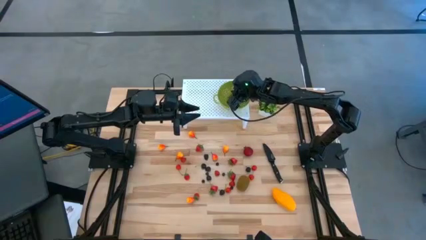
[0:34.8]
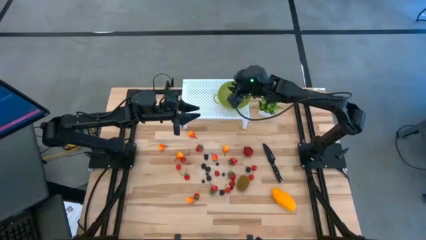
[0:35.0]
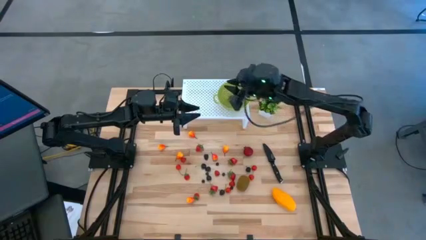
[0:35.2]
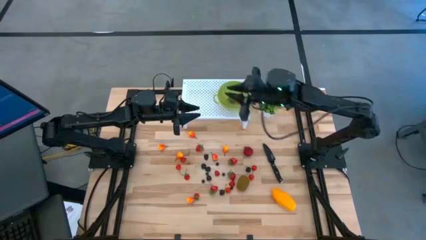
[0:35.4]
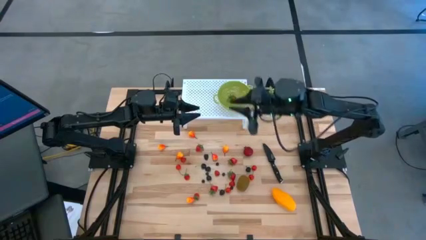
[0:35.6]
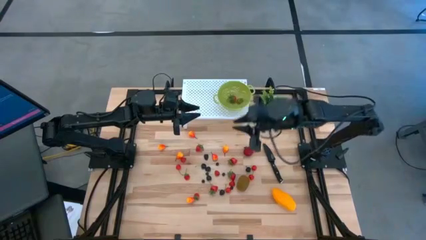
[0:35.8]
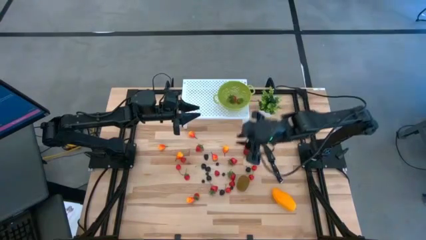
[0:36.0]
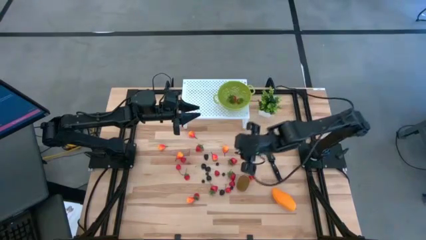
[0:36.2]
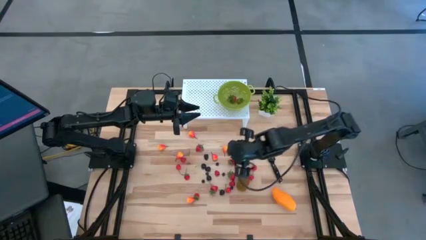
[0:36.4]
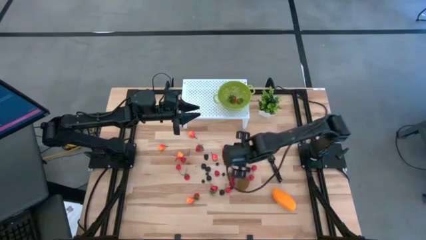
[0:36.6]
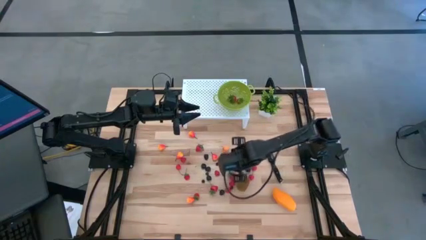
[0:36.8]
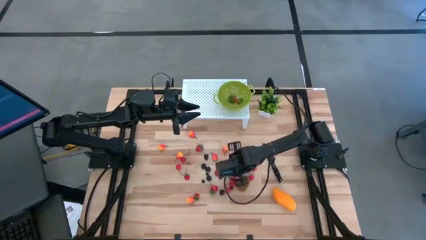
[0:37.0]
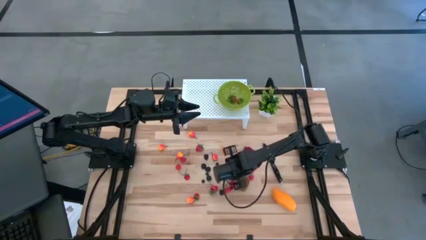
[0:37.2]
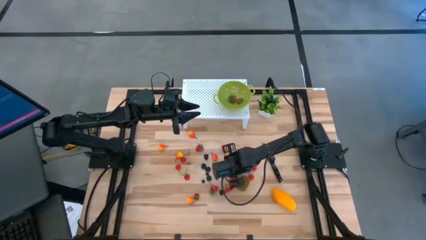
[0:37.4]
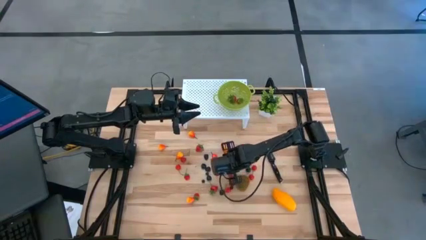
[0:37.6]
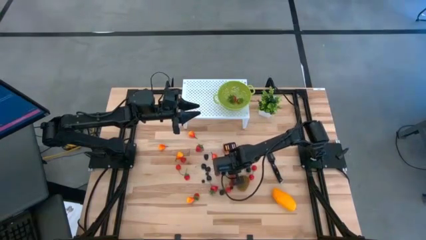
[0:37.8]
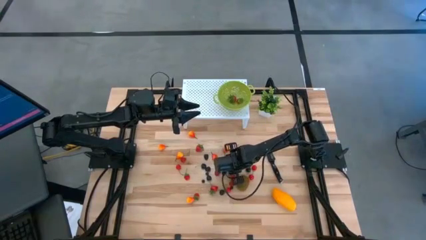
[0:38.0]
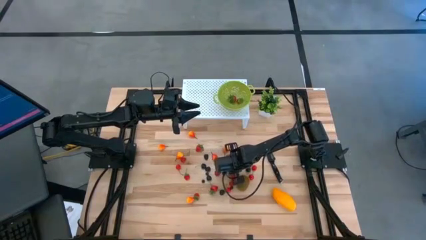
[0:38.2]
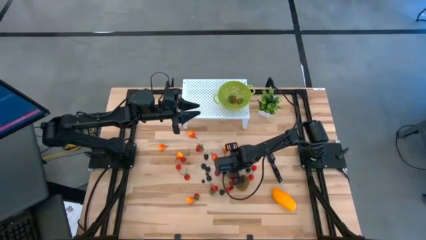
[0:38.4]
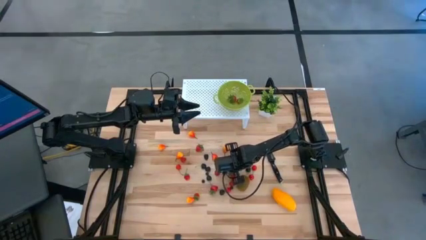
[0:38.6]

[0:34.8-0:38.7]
Task: Pick & Place Fruit
Put the red strawberry into the green strainer bowl

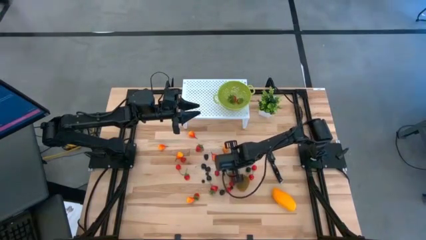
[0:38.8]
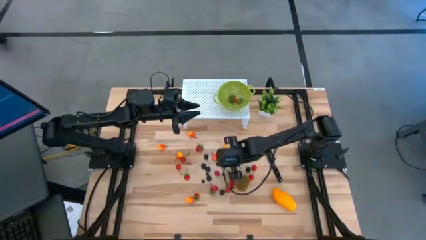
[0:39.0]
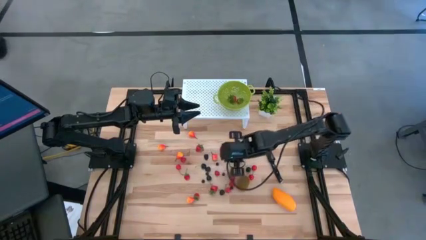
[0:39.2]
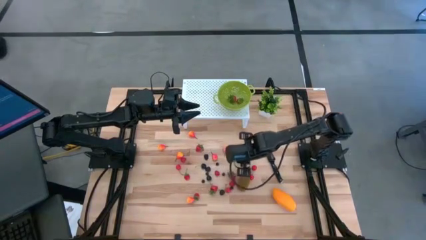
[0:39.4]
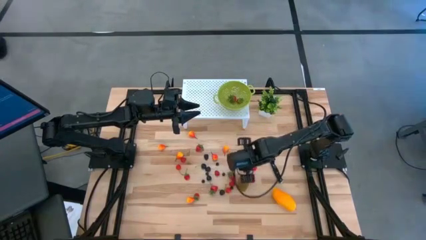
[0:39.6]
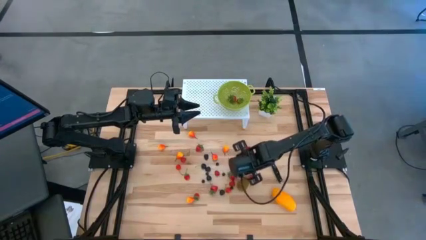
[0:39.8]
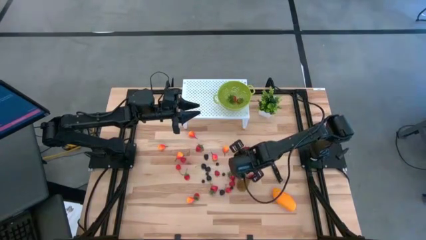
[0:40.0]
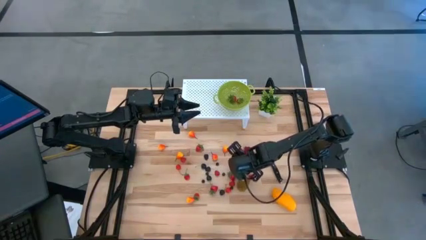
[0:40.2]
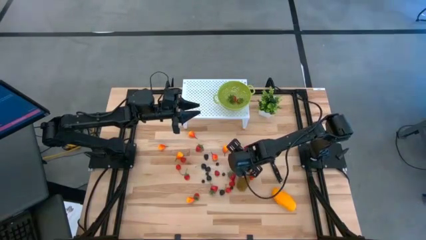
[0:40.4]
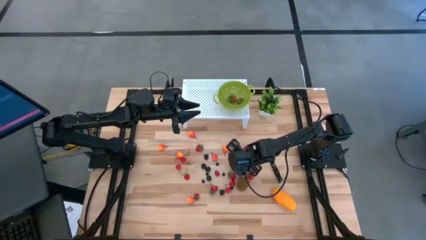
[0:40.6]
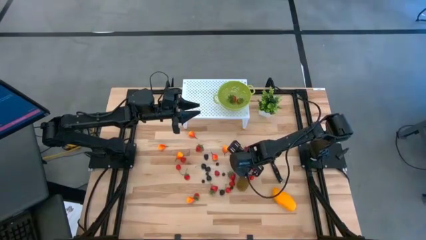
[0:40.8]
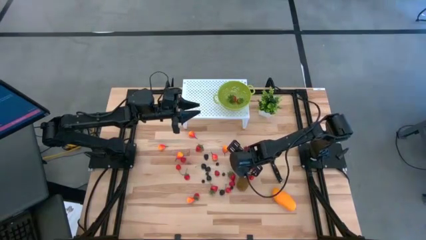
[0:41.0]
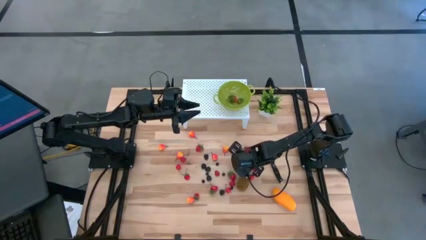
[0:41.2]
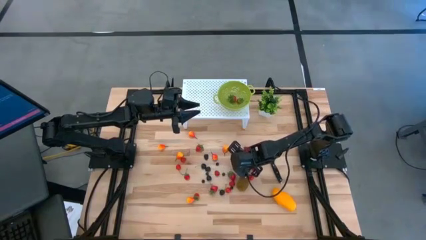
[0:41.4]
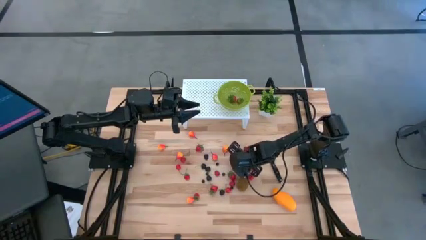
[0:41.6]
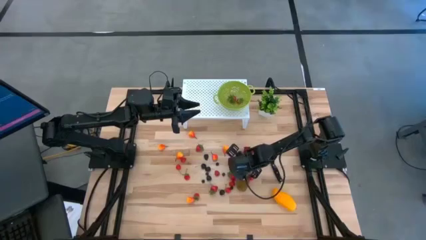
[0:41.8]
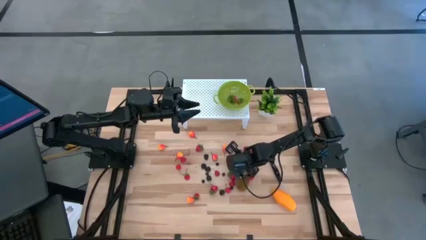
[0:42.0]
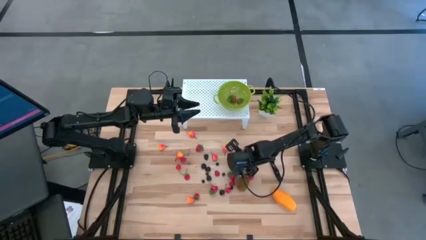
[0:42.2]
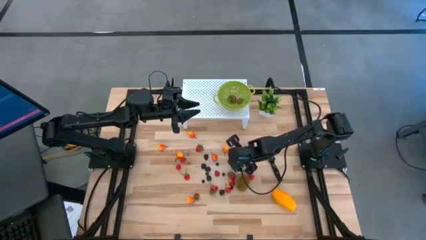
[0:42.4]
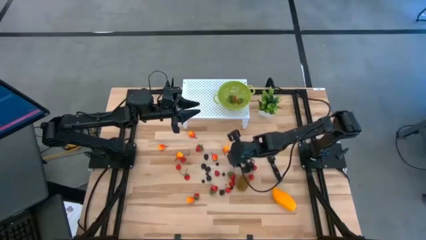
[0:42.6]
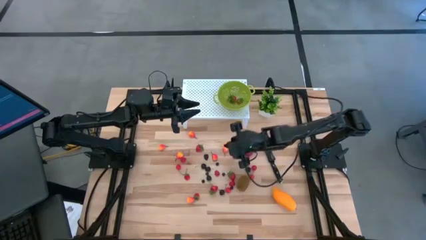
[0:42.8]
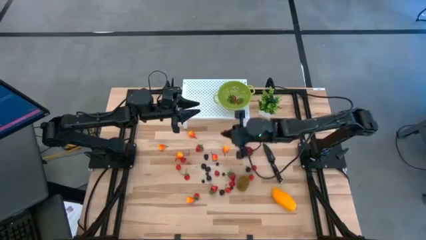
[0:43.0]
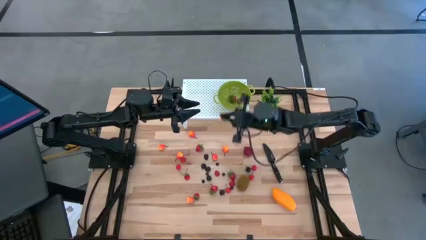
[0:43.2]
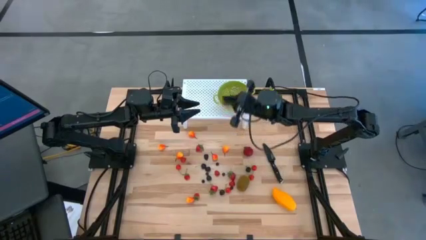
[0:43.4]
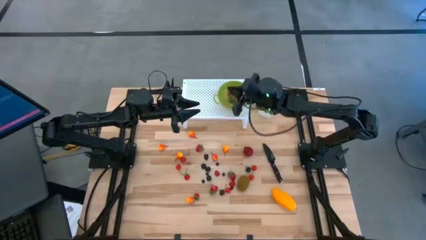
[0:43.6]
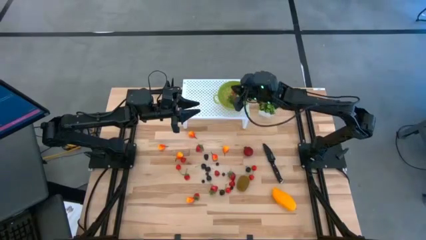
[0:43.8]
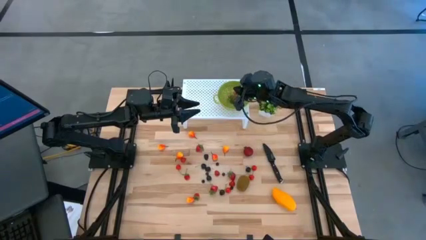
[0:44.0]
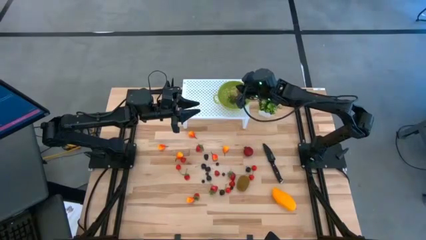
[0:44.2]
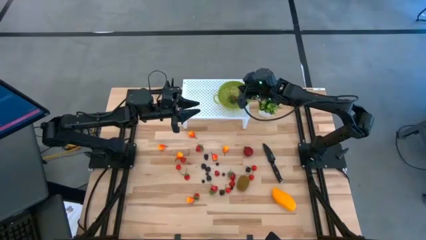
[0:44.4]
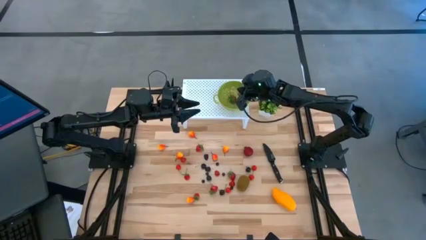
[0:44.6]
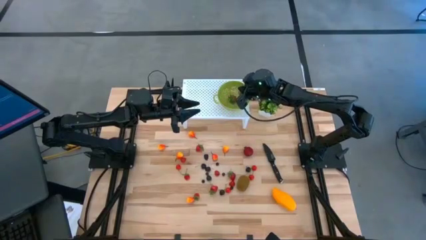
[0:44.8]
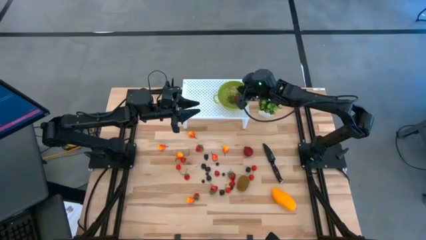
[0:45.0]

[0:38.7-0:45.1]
Put the red strawberry into the green strainer bowl

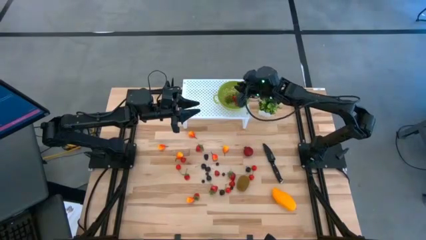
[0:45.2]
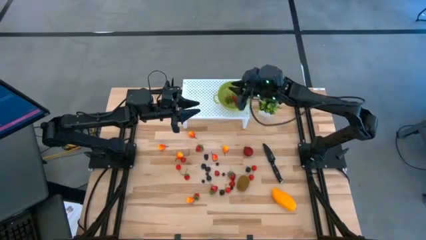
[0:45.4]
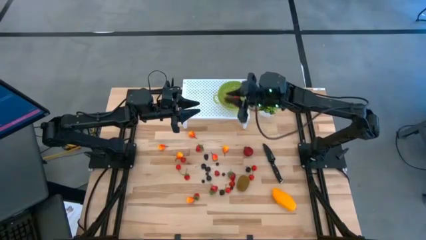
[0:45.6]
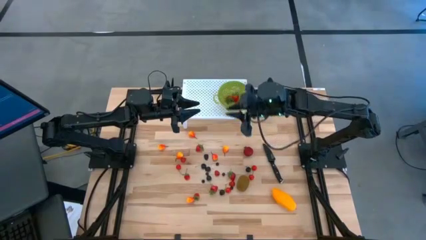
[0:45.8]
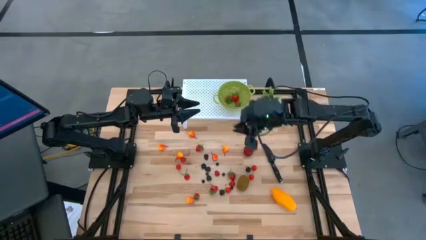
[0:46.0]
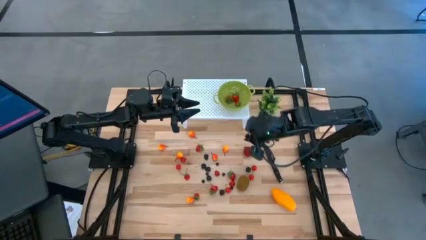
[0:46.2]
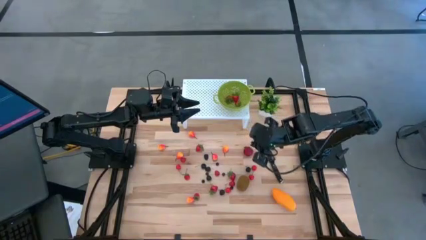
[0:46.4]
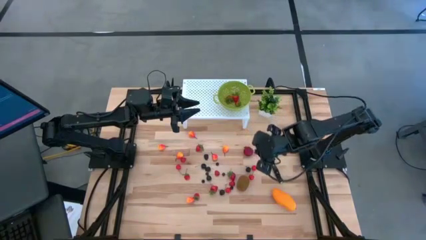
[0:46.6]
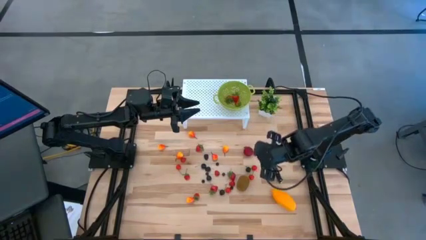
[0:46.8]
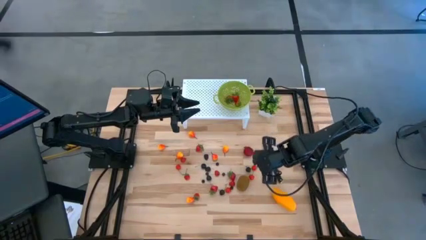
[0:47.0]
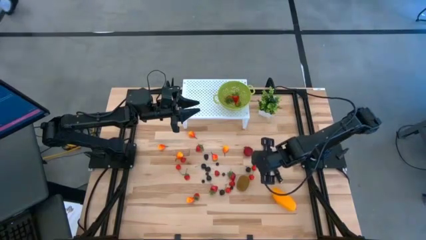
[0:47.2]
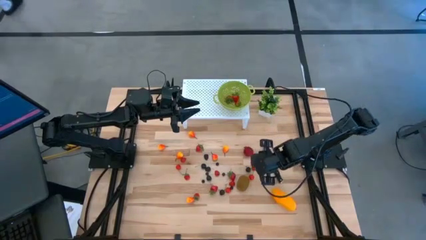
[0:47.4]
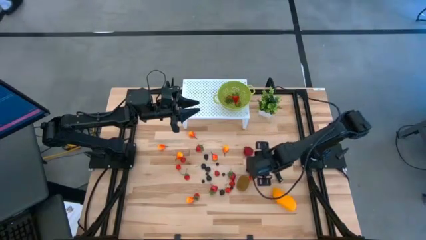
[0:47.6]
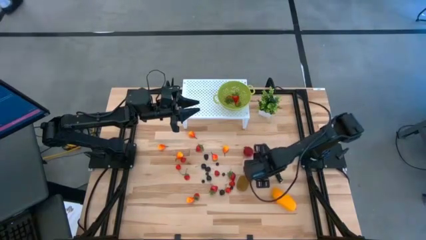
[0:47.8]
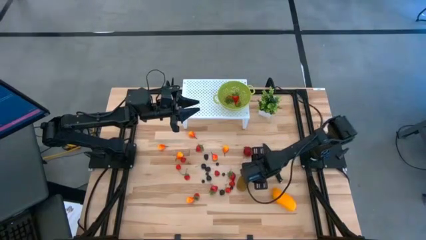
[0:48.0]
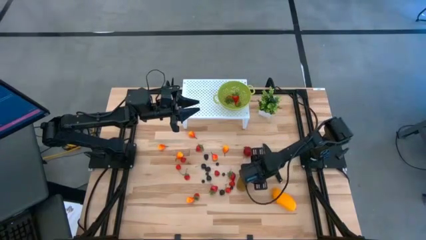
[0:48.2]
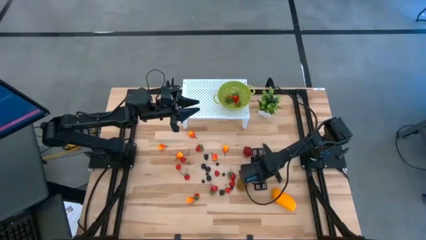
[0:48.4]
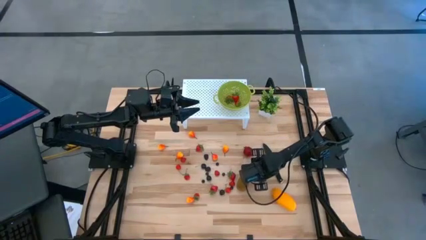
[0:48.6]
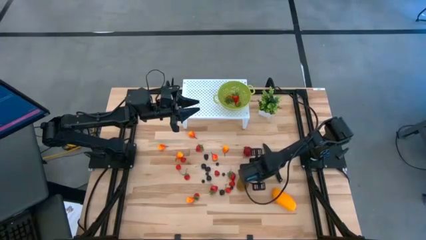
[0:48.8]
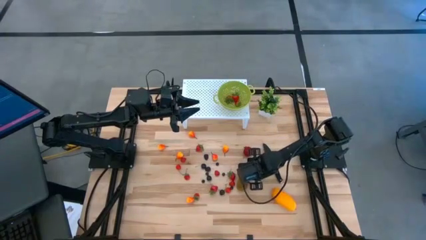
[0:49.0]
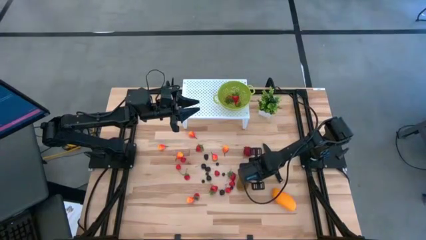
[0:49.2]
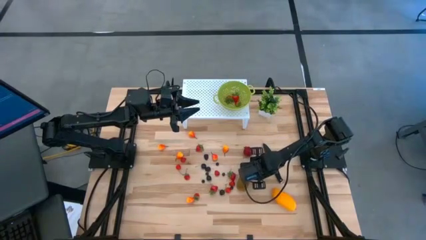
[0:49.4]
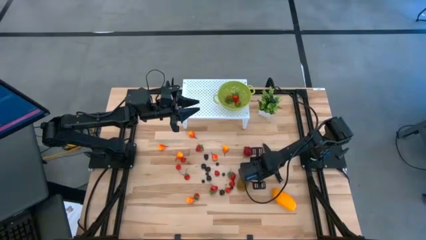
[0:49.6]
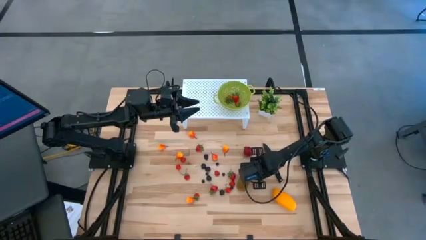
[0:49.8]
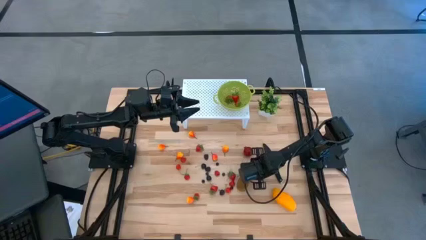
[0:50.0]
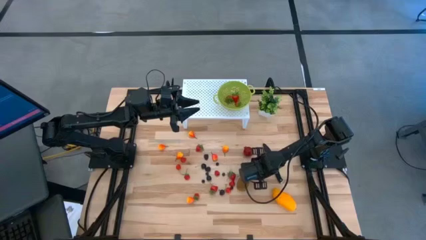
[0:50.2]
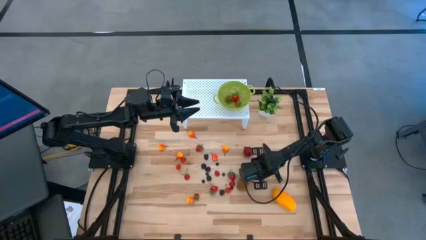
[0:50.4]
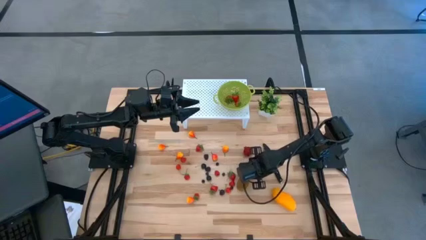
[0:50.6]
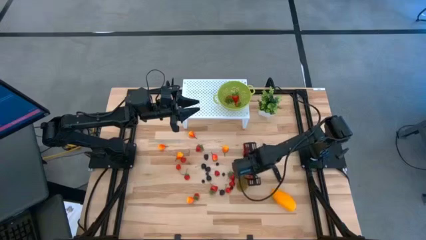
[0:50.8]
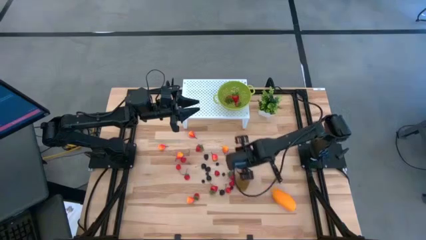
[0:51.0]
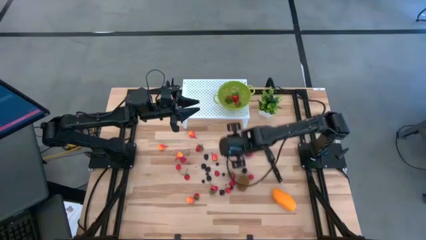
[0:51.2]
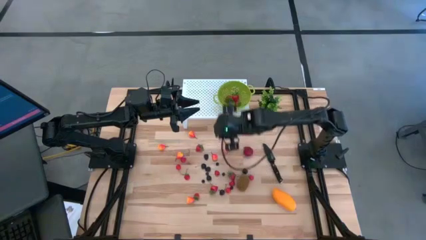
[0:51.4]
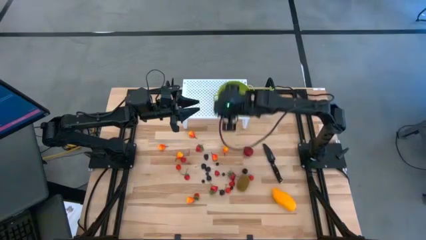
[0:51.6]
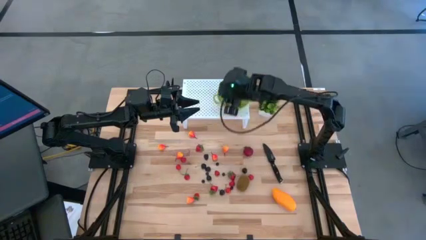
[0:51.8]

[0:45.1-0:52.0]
Put the red cherry into the green strainer bowl
